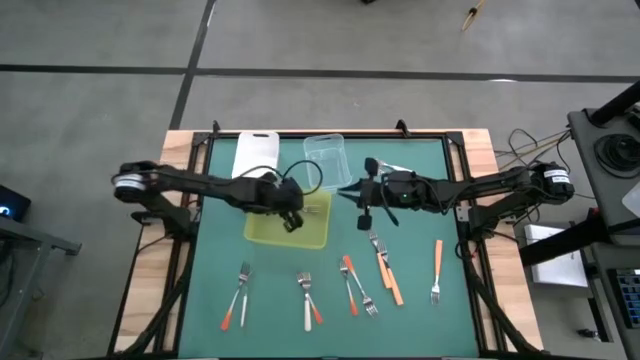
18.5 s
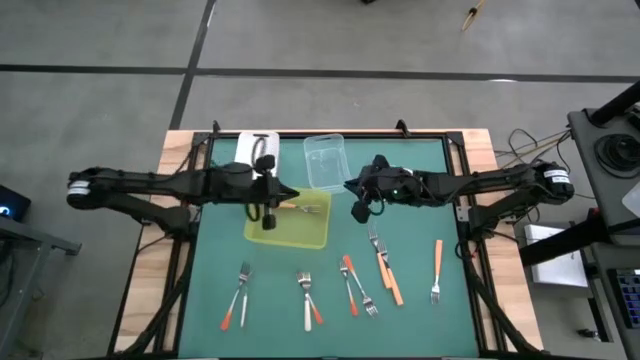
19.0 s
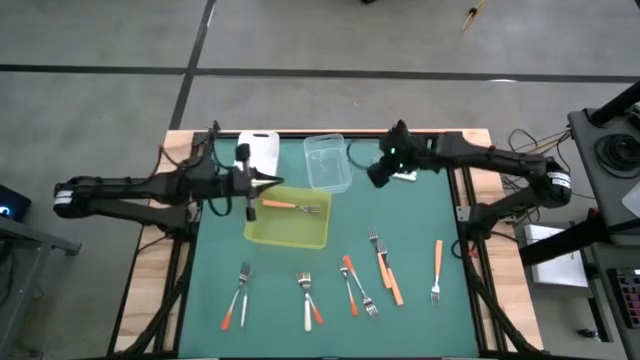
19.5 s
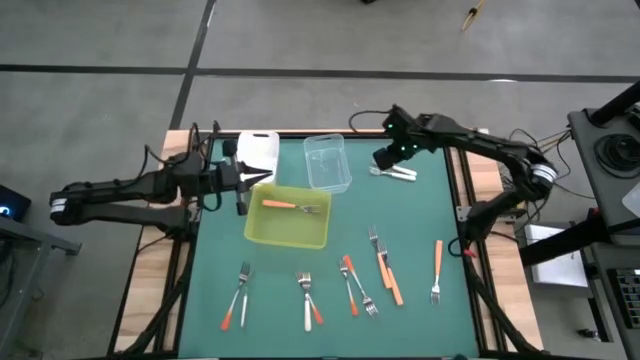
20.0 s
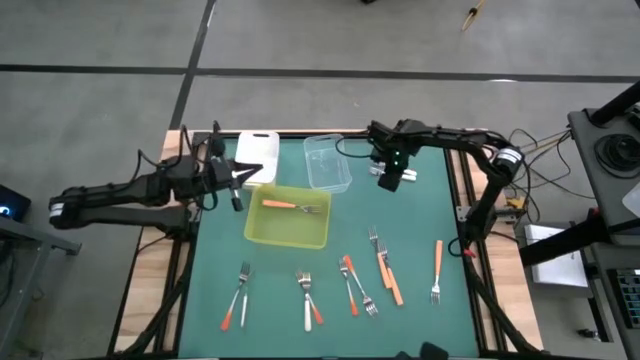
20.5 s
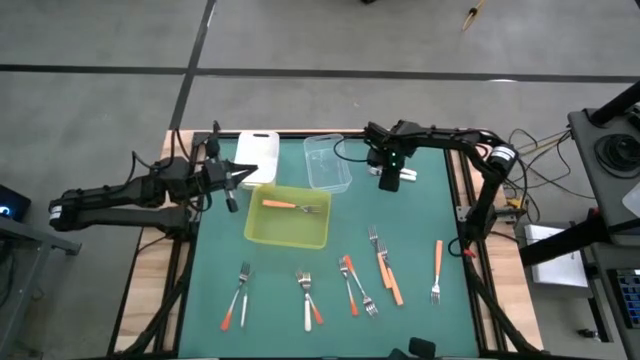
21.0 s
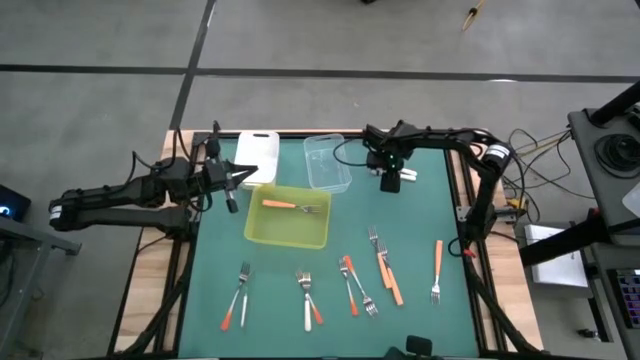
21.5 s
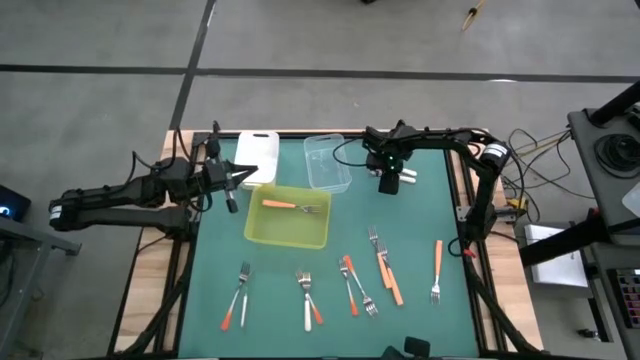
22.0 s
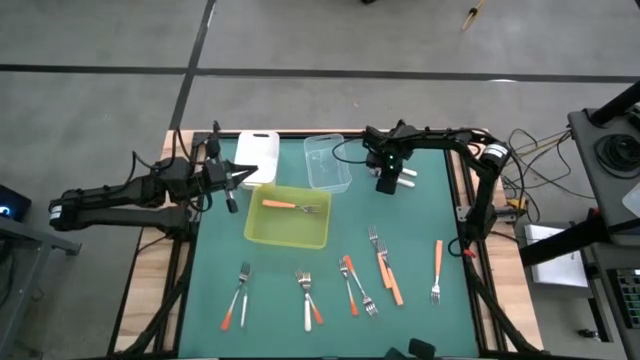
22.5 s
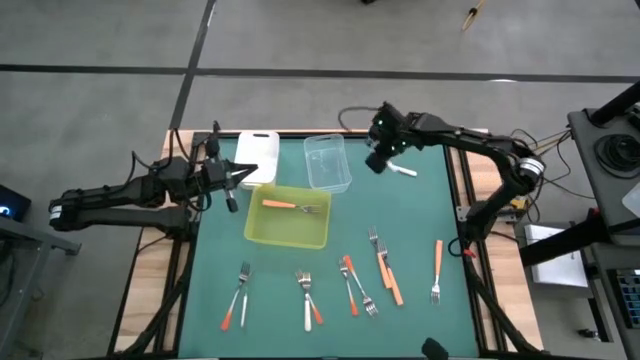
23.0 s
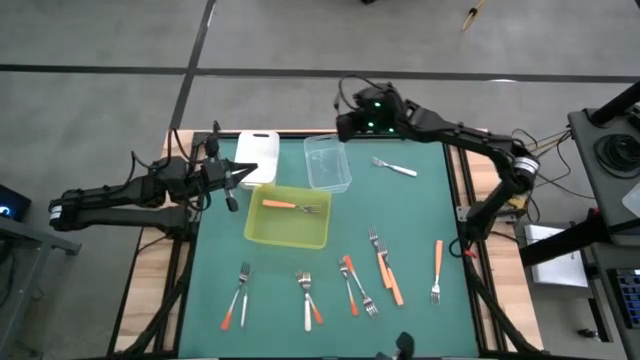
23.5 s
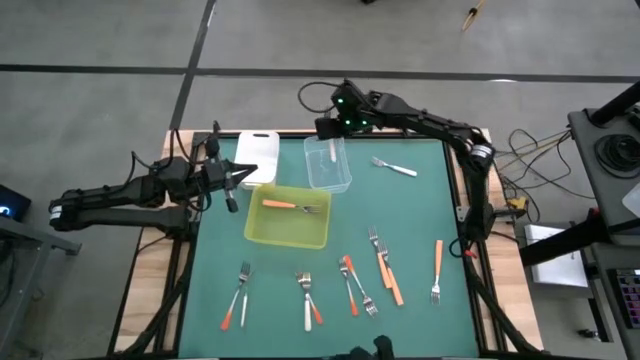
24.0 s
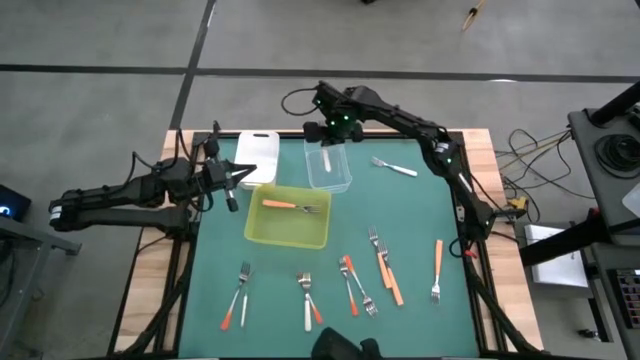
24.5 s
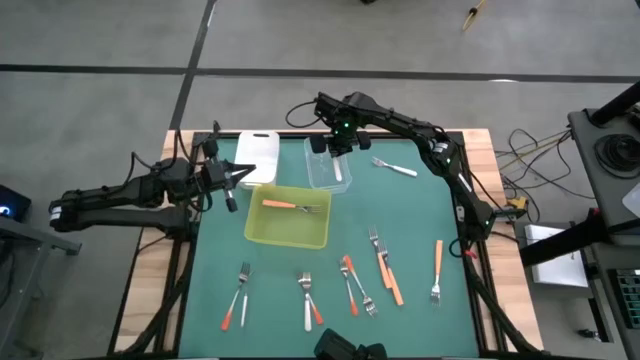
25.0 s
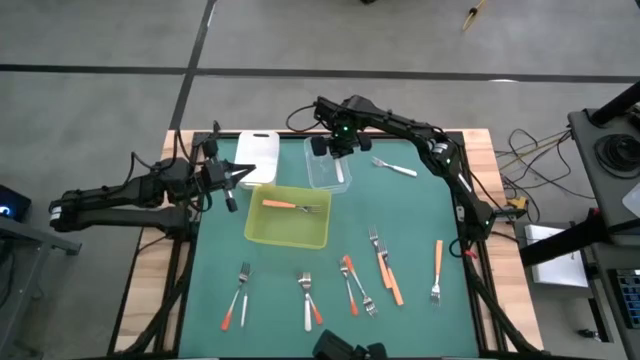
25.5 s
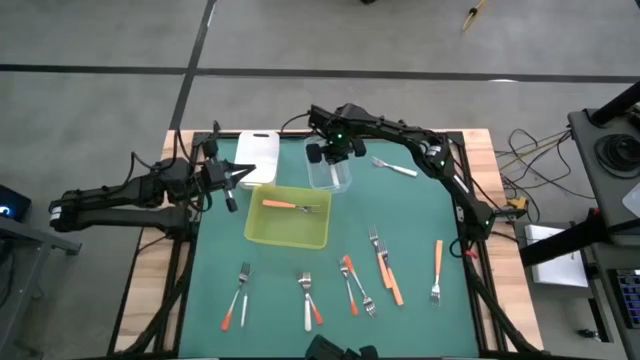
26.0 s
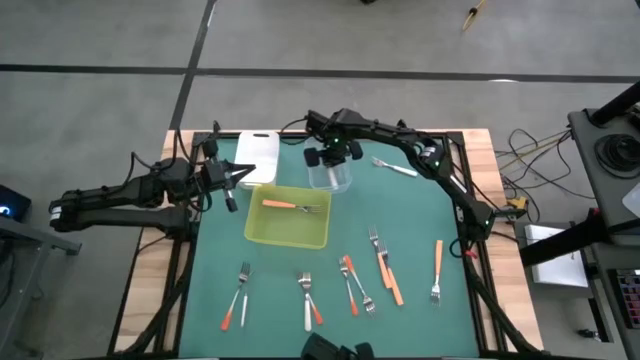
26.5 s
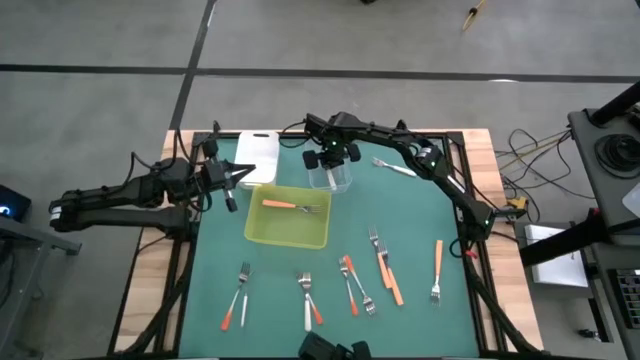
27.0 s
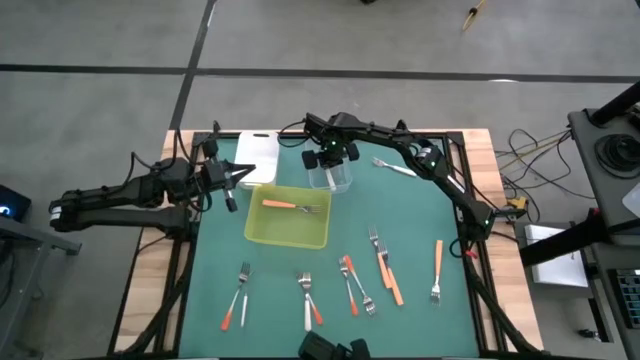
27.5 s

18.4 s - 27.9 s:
Task: Sort silverware by color (type)
Put the white fork into the transparent bin

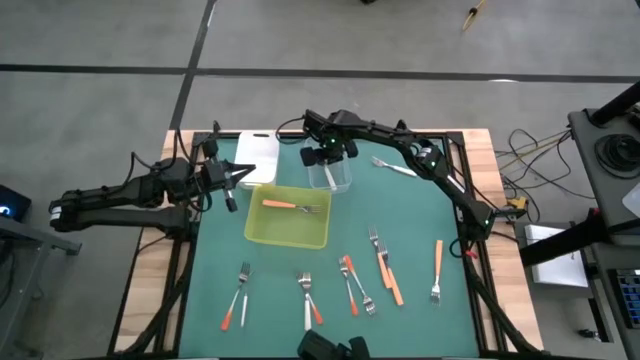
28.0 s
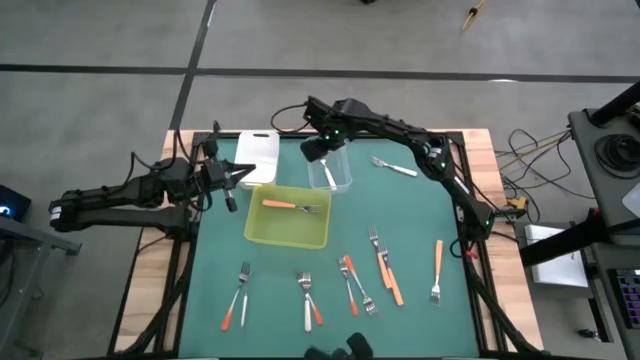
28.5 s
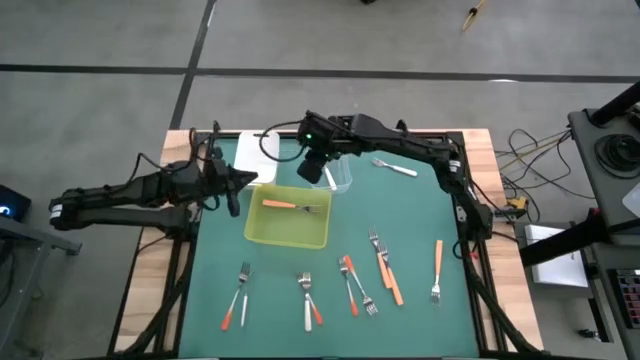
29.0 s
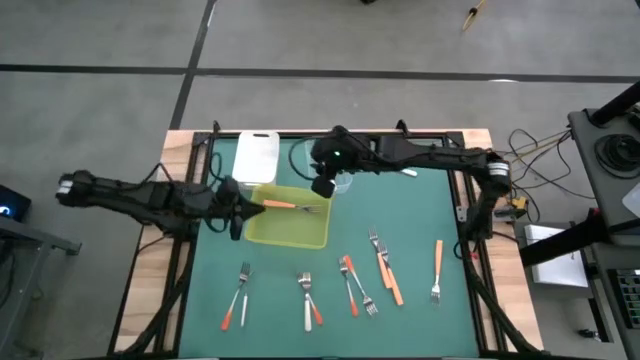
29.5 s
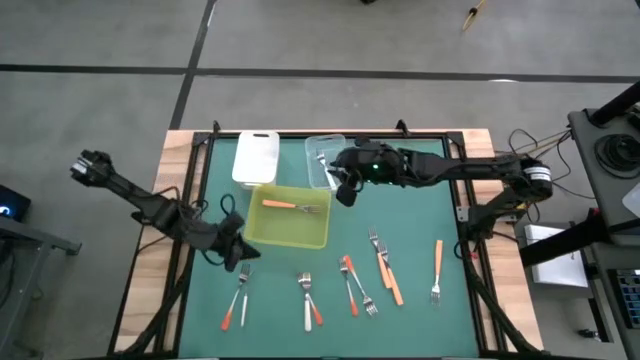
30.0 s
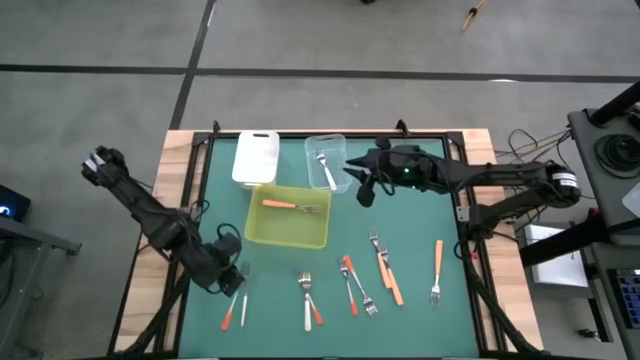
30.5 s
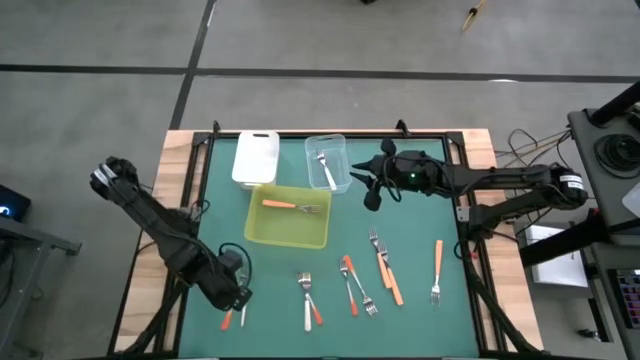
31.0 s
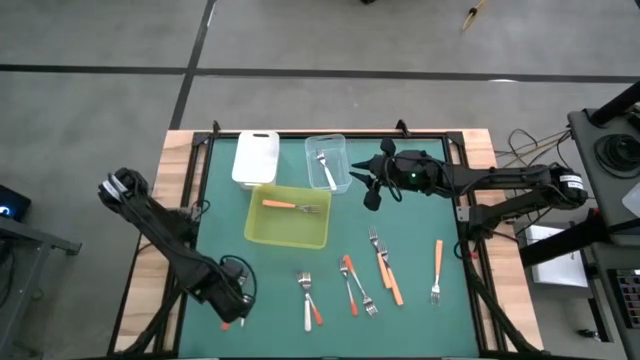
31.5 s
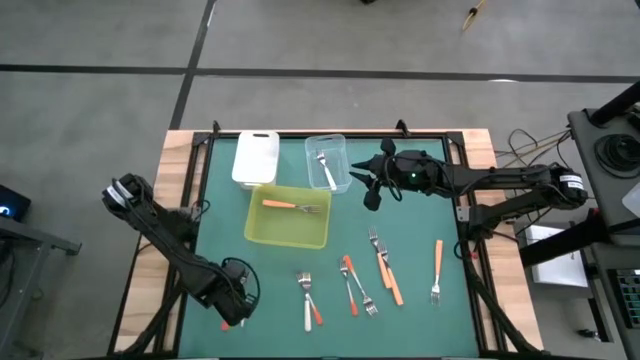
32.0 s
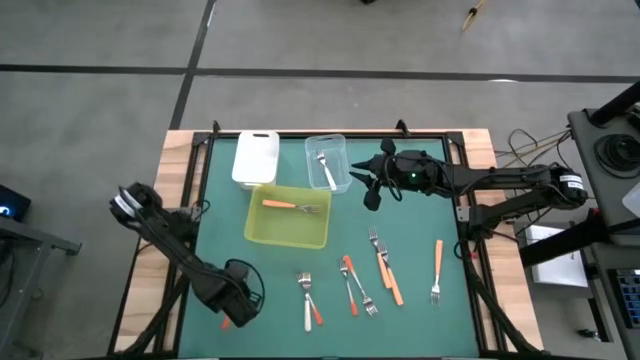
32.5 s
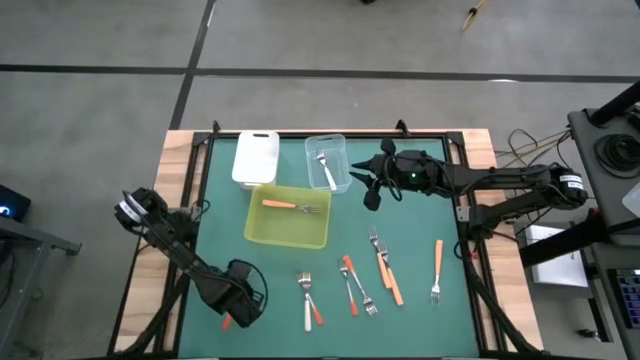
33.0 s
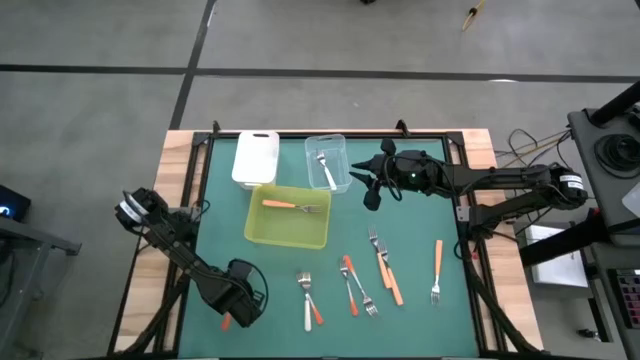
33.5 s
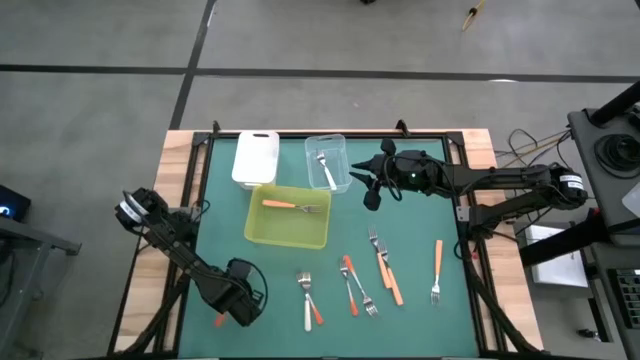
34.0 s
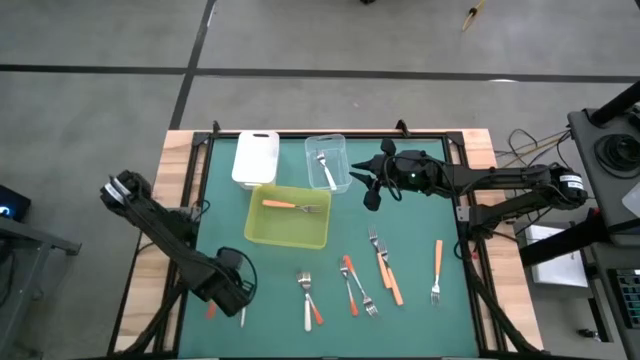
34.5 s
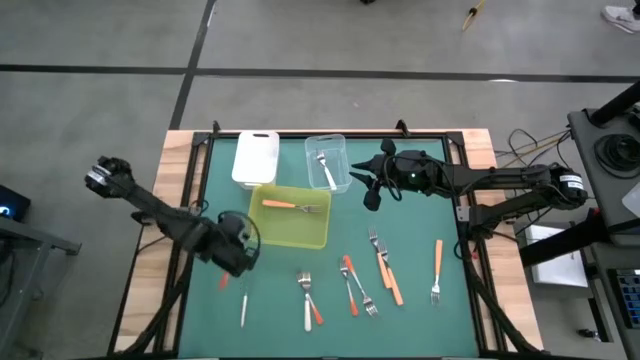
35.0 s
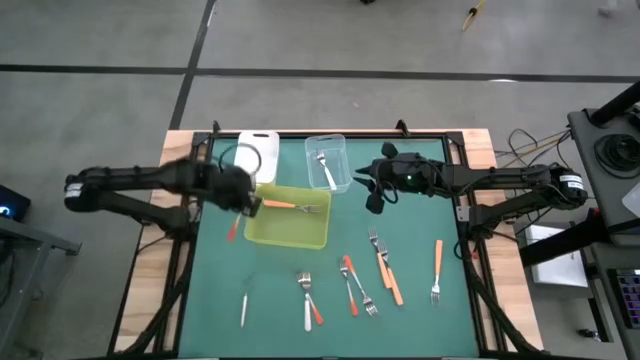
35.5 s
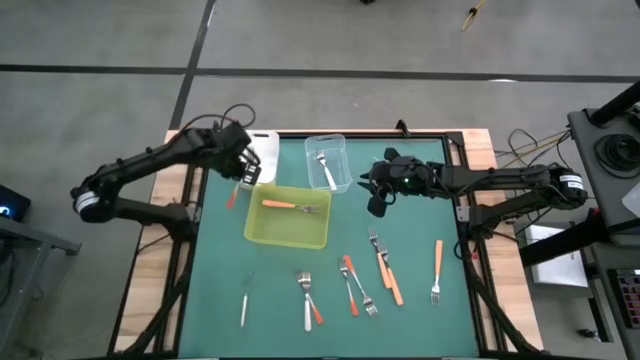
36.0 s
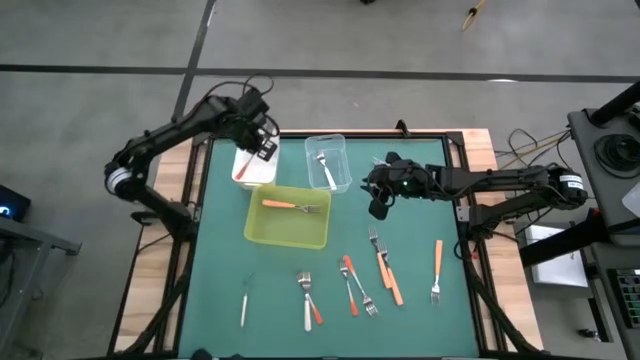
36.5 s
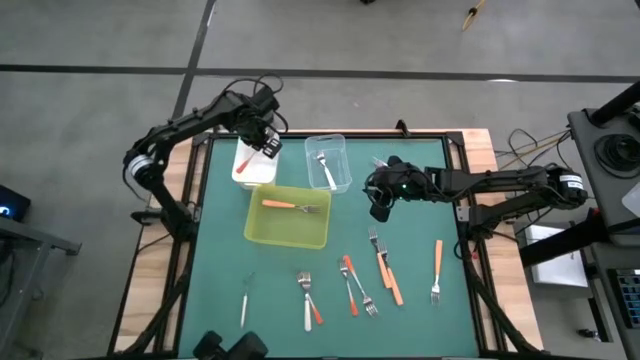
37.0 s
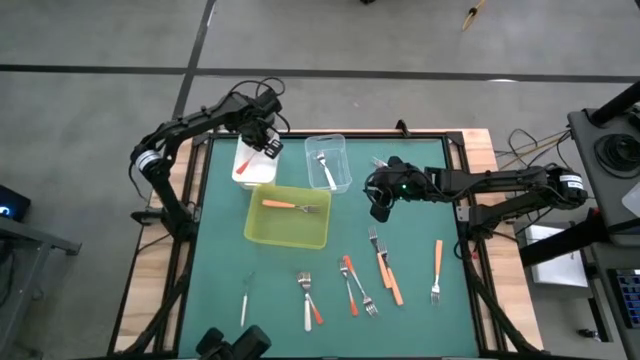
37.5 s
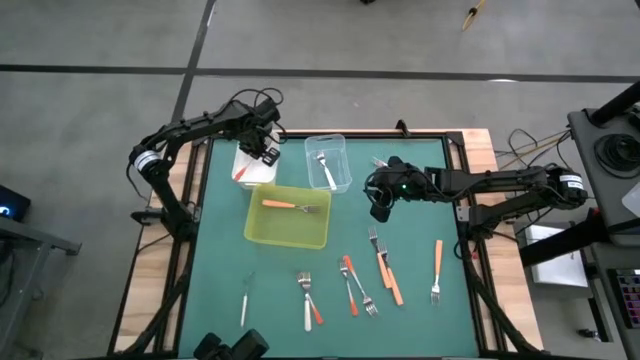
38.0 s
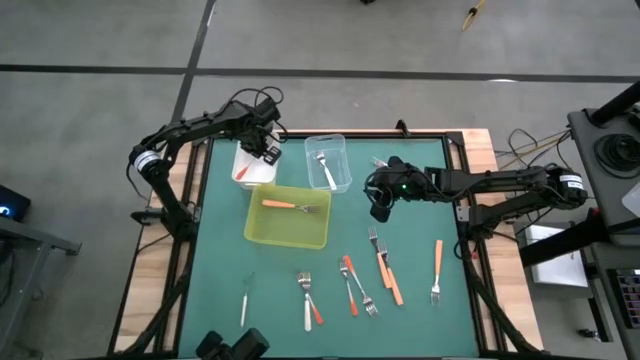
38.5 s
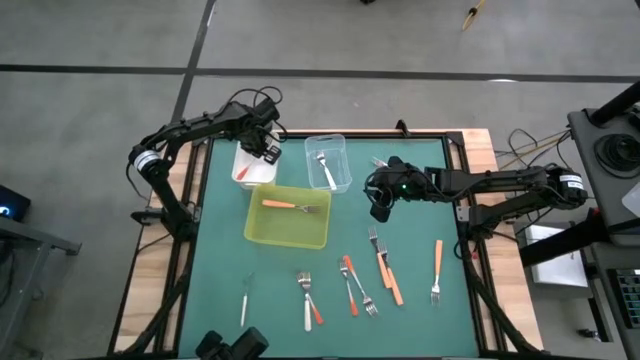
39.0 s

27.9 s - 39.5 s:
Put the orange fork into the white bin
